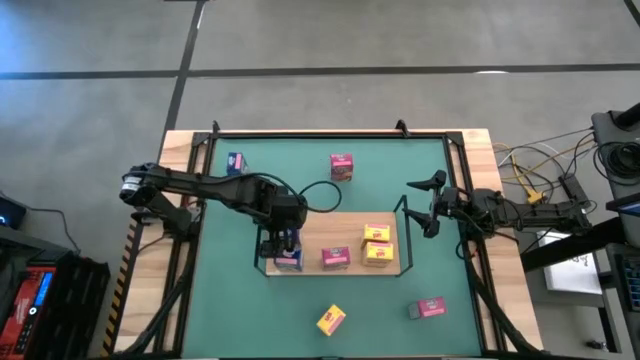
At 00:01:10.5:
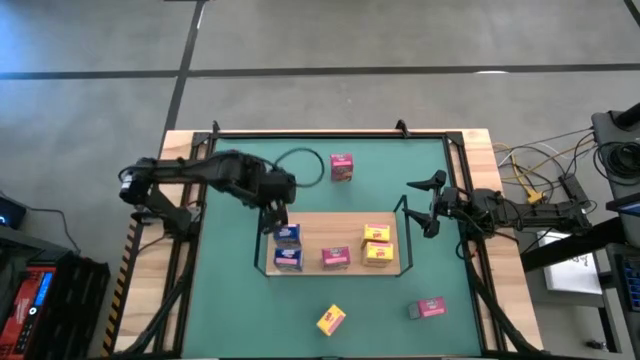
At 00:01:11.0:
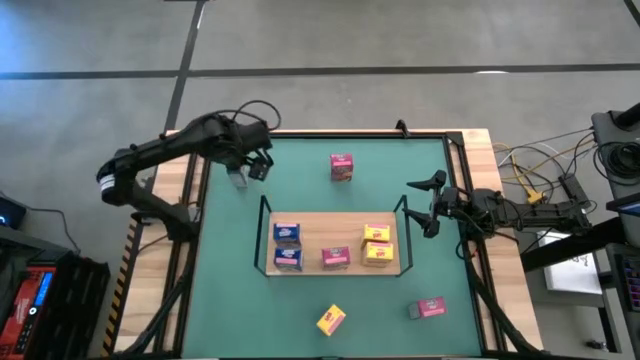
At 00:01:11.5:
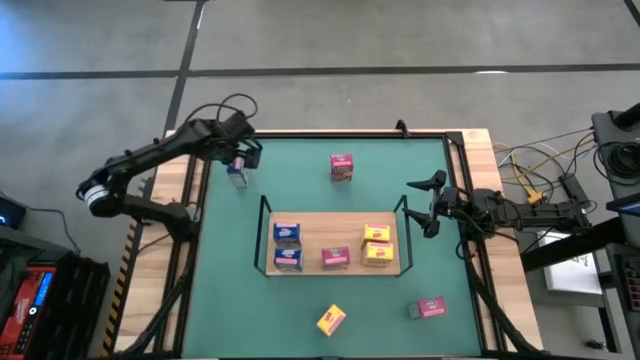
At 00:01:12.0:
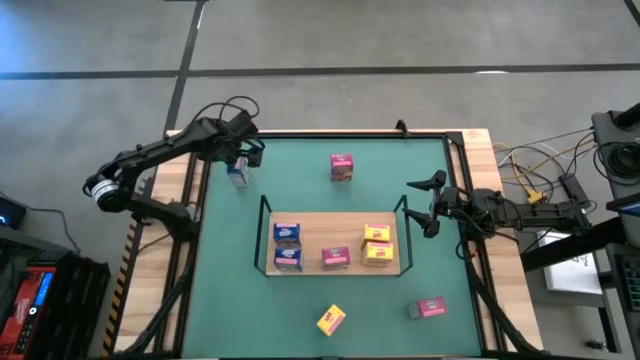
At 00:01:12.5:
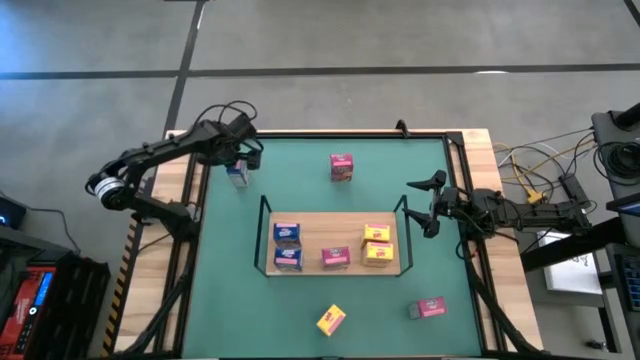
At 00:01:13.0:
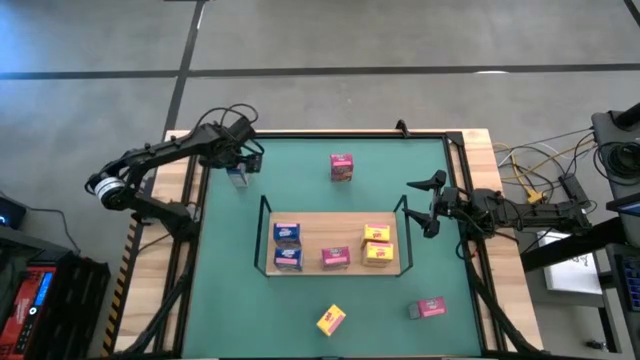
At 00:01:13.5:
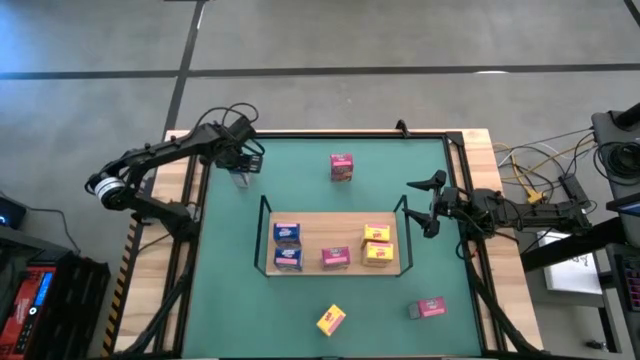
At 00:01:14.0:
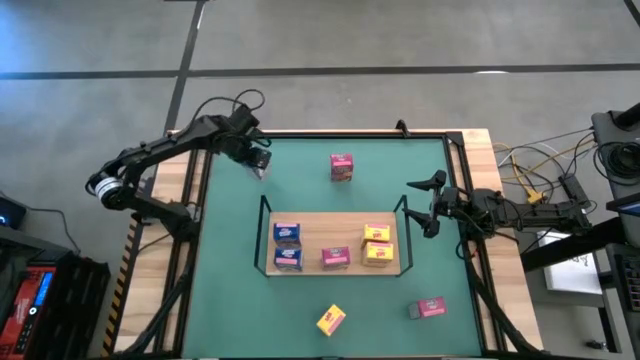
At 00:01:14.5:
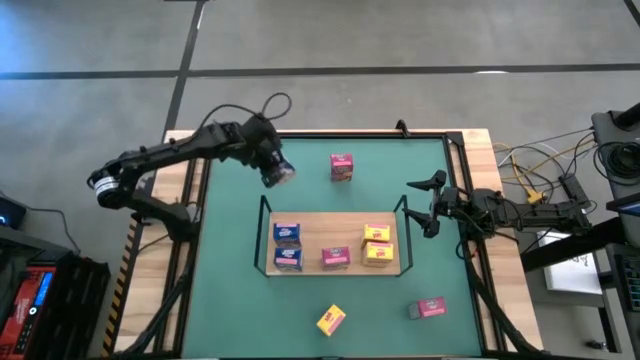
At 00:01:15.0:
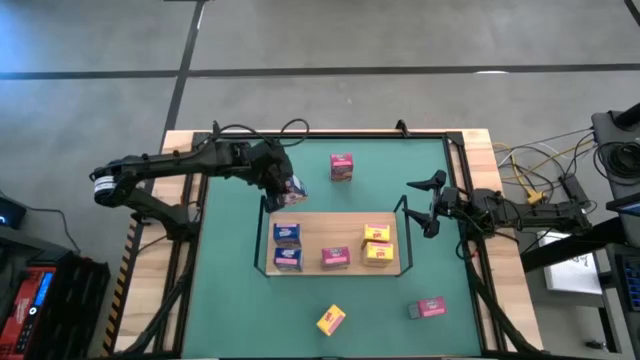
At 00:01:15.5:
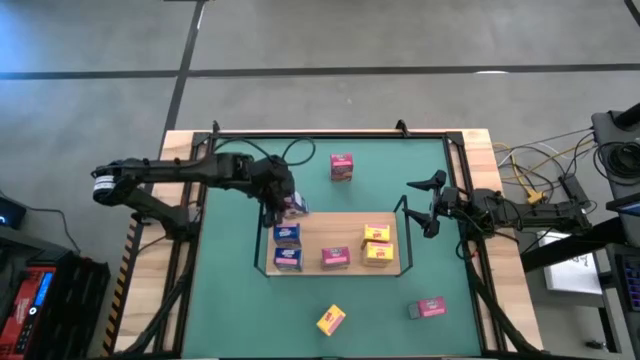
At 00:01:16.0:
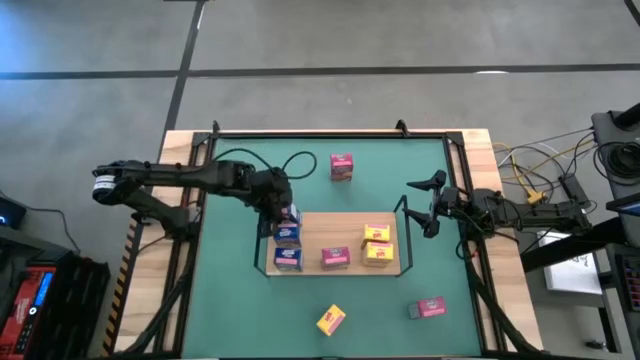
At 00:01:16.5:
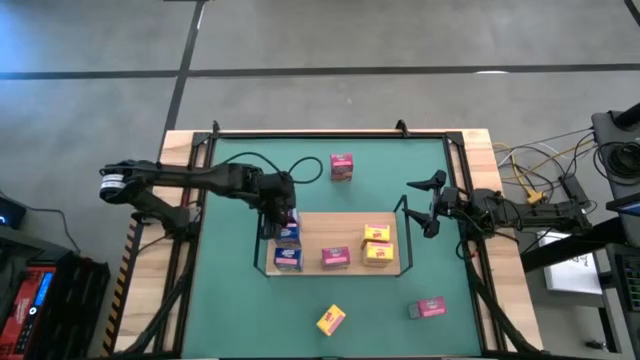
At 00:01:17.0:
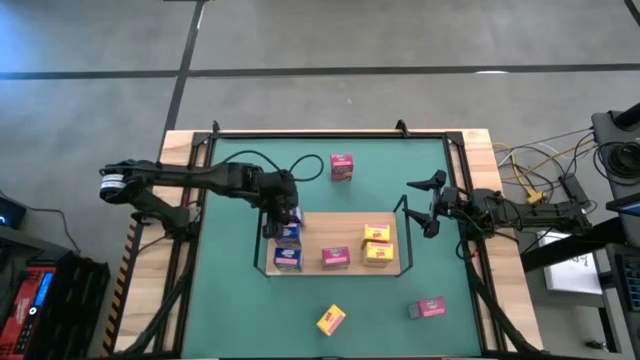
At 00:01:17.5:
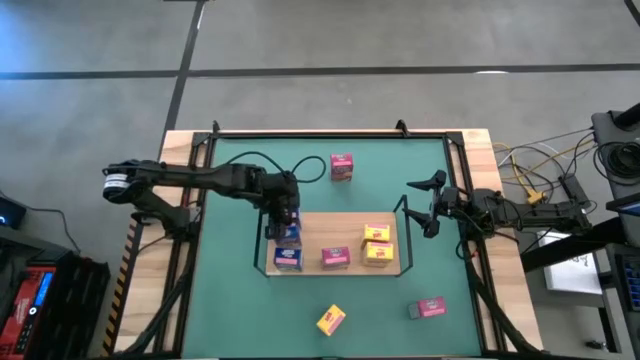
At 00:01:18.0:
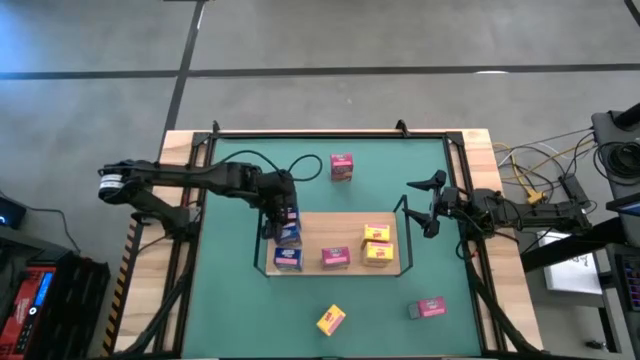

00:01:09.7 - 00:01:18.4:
Task: Stack cereal on shelf
Put the blue cereal box on the shelf aligned with the other blue cereal box

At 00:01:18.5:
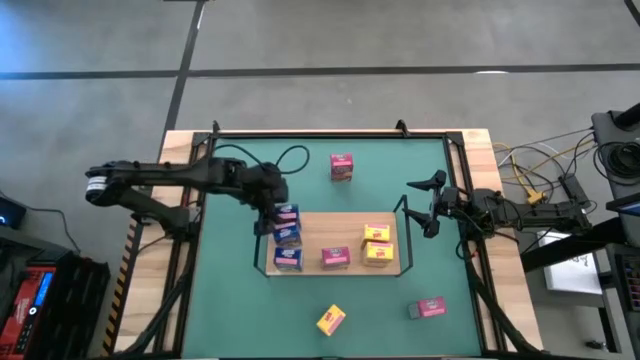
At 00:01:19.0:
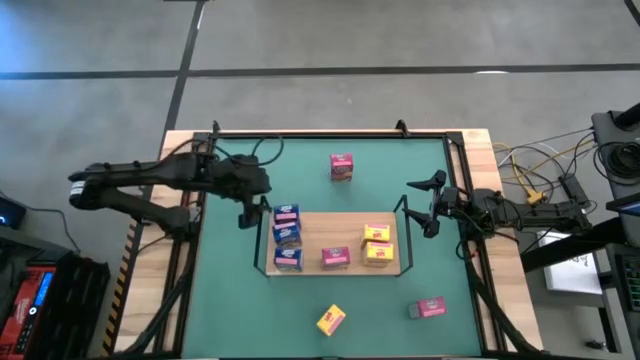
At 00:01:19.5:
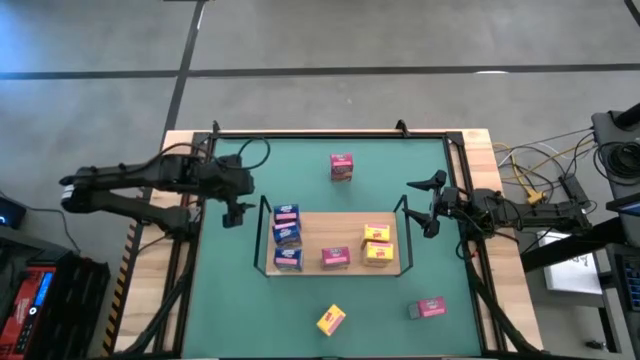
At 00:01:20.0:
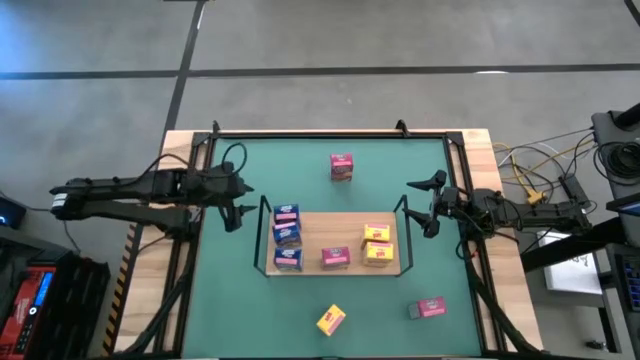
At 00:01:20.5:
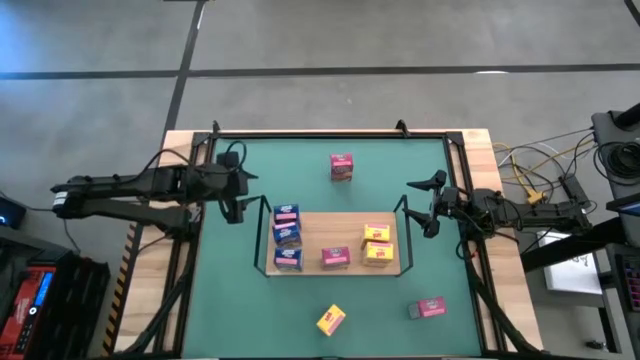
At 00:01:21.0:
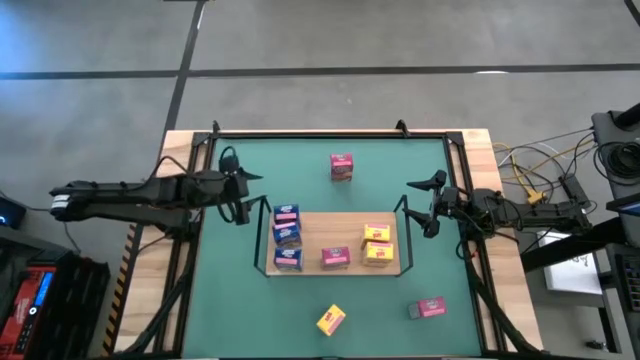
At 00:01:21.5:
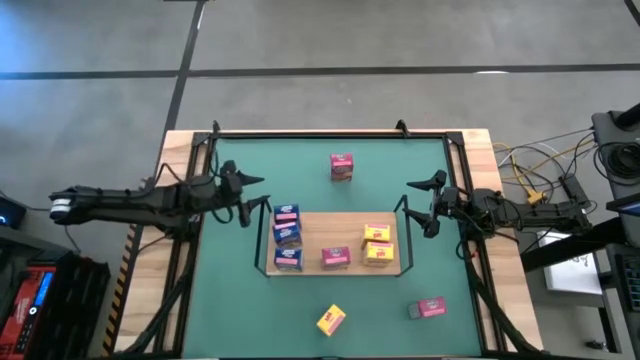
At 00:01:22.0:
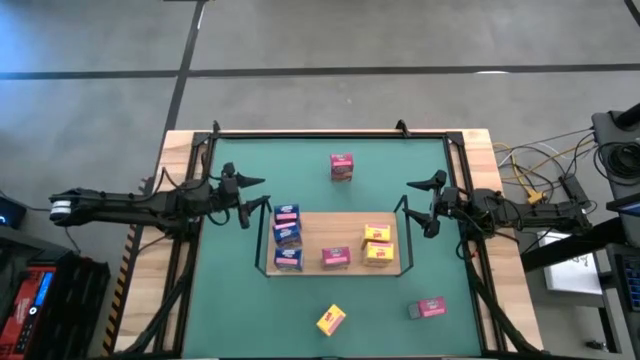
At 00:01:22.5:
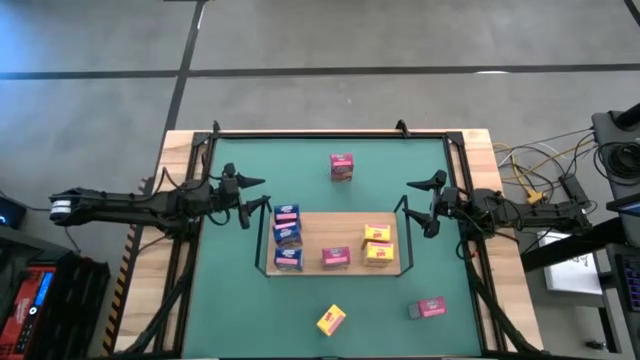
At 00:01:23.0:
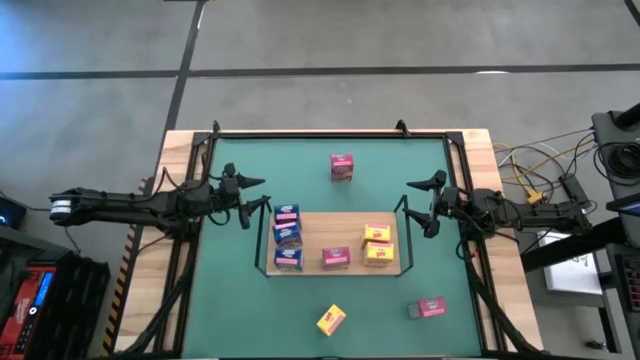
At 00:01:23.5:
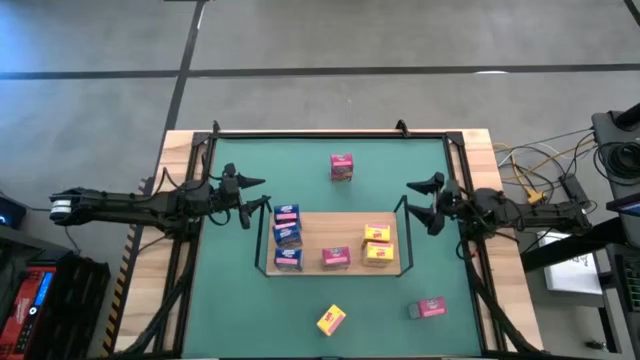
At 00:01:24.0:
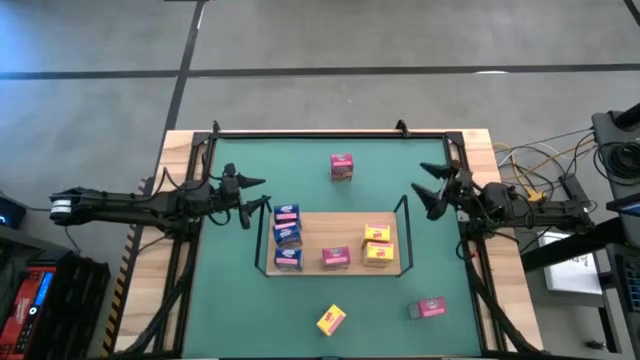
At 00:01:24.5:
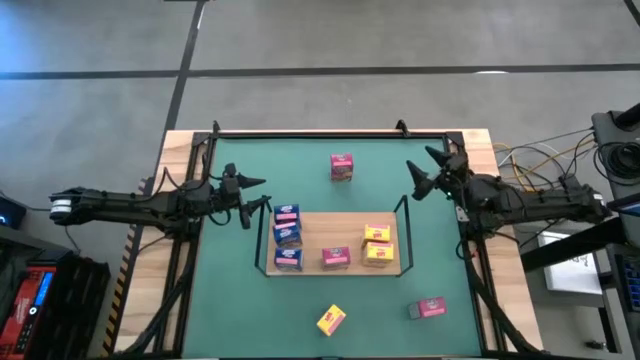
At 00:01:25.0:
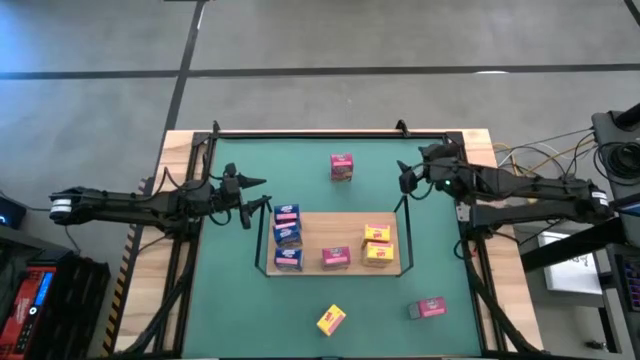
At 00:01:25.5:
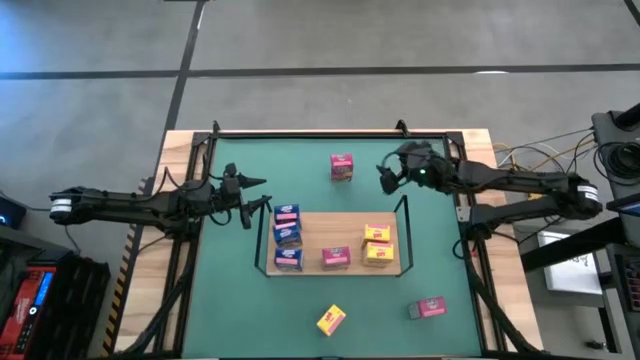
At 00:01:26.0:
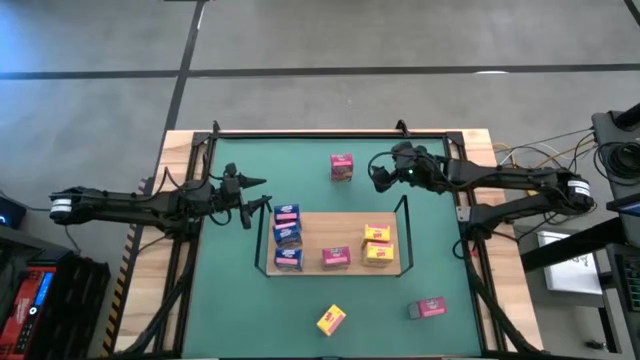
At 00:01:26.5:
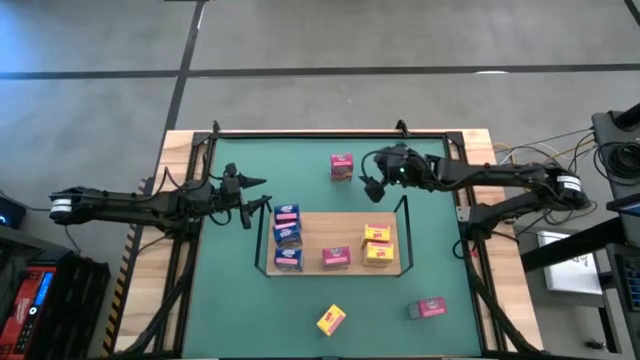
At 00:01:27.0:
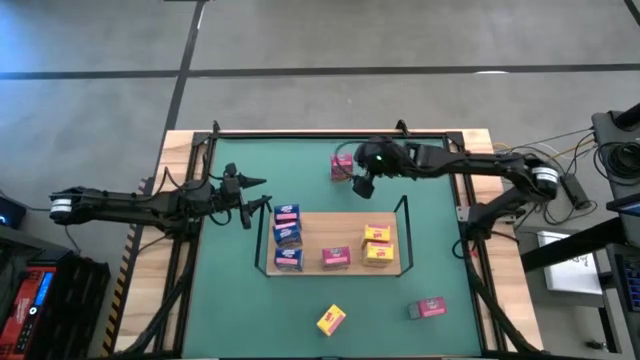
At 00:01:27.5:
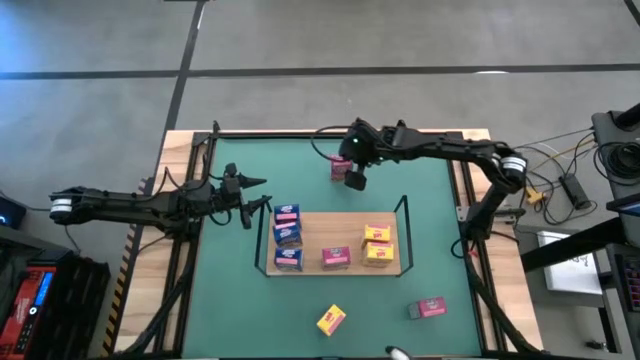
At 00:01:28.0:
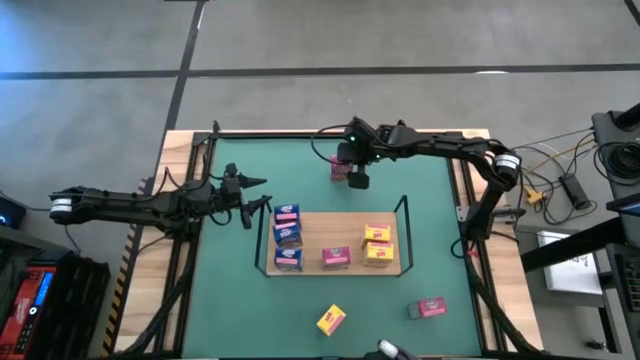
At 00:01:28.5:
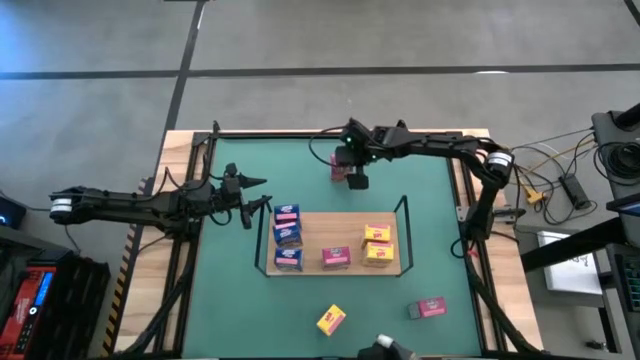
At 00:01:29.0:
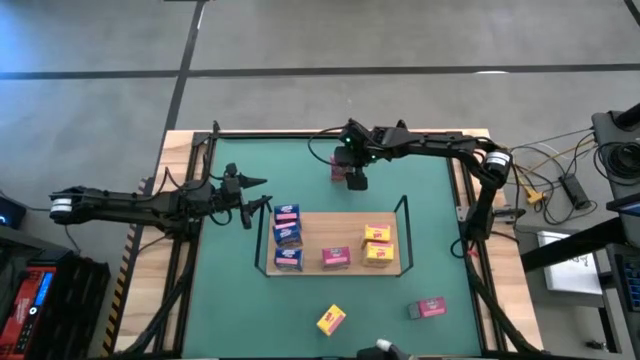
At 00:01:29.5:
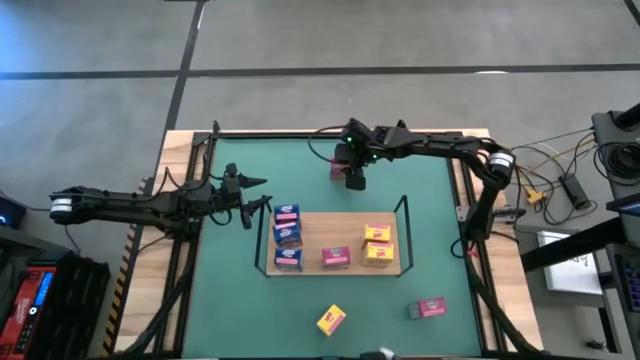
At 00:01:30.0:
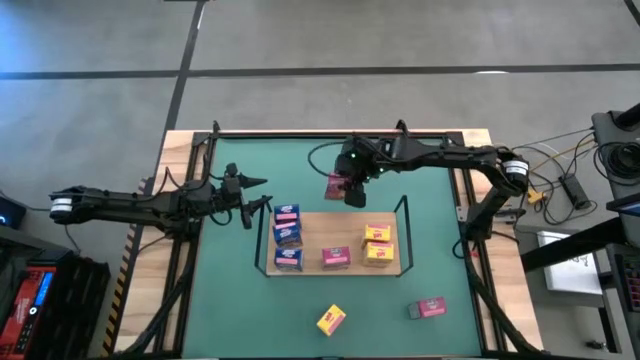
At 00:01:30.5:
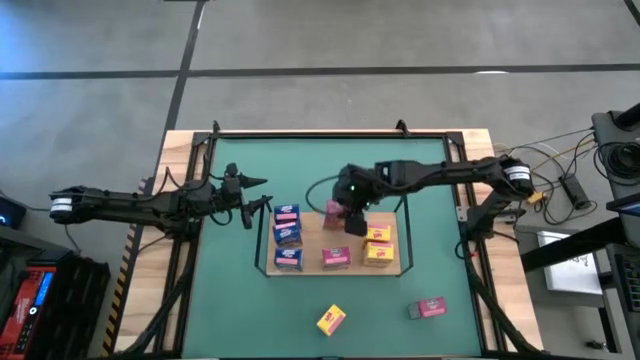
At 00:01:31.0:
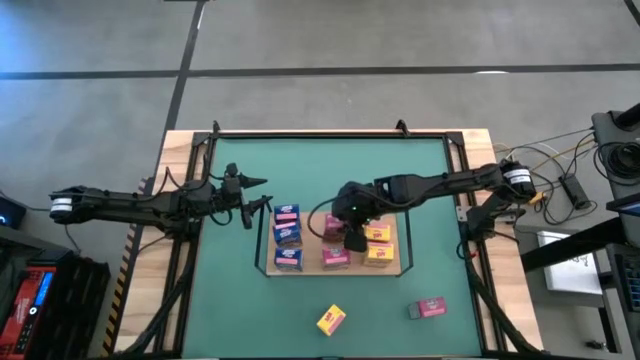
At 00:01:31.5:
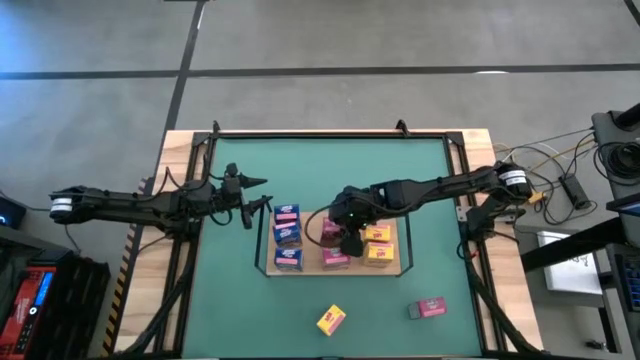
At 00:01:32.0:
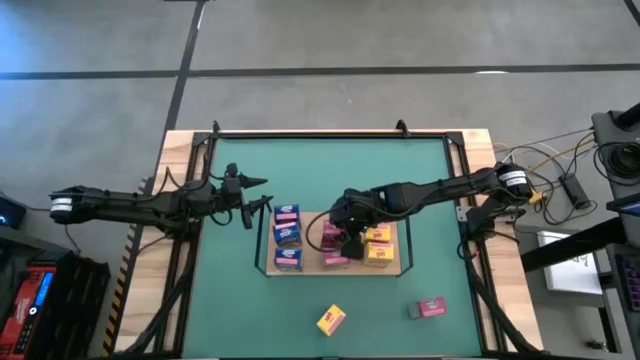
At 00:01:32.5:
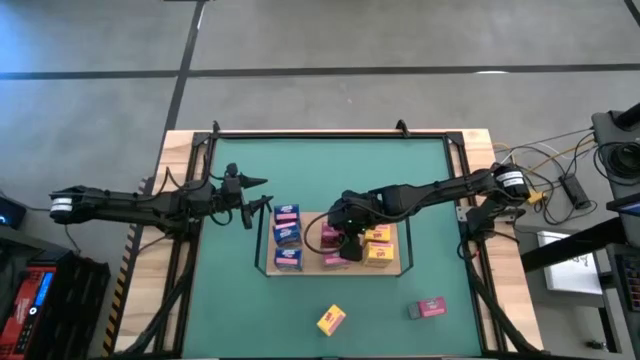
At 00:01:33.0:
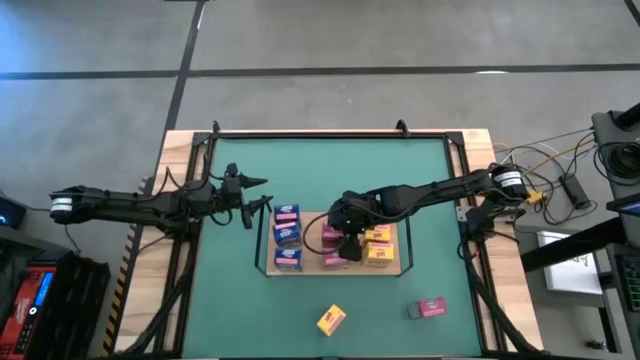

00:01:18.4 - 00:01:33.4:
Put the top pink cereal box on the shelf aligned with the other pink cereal box
